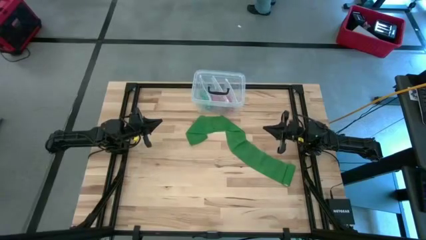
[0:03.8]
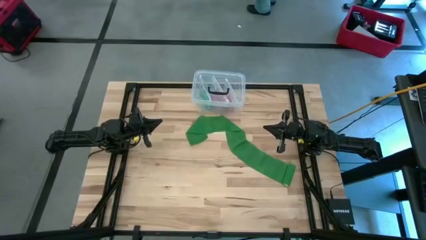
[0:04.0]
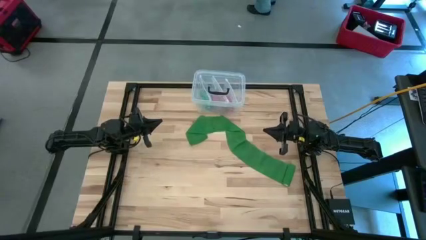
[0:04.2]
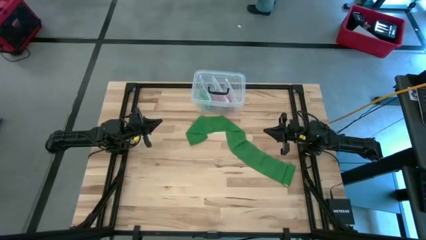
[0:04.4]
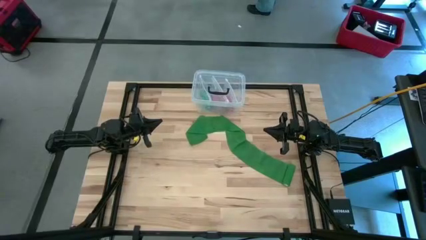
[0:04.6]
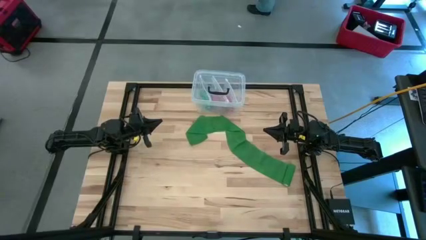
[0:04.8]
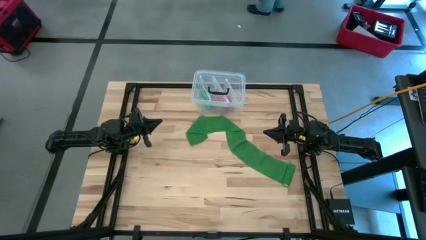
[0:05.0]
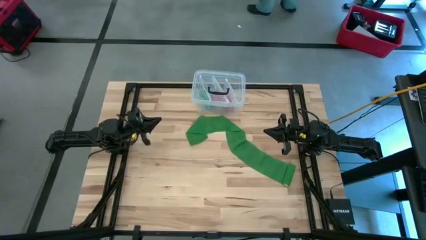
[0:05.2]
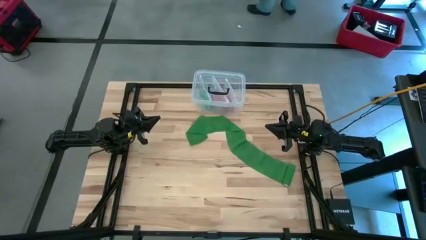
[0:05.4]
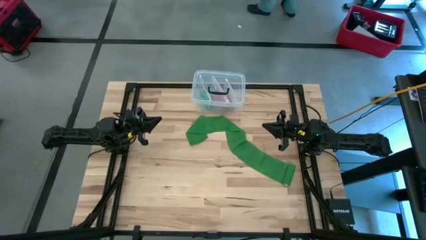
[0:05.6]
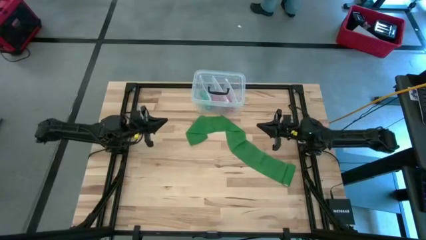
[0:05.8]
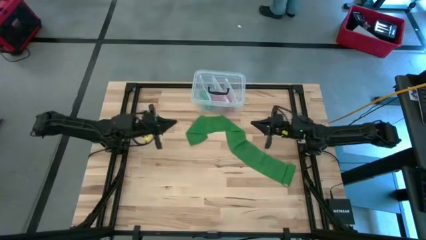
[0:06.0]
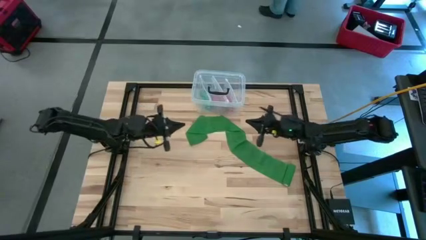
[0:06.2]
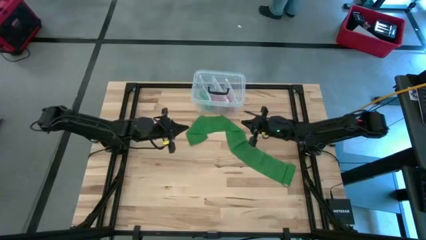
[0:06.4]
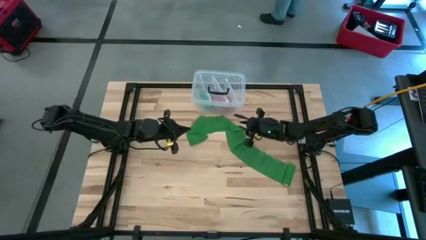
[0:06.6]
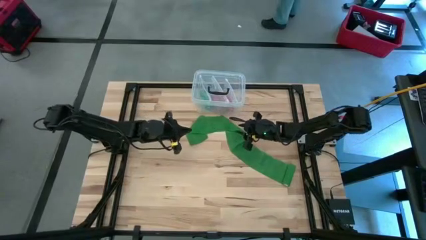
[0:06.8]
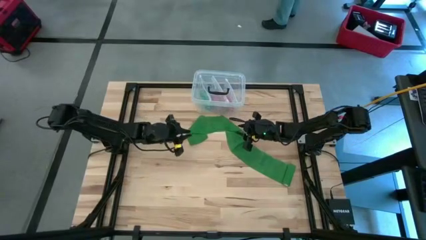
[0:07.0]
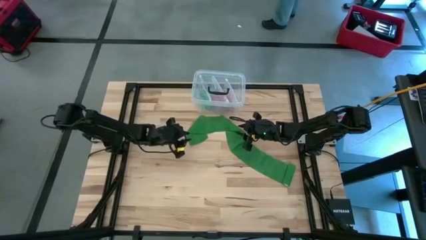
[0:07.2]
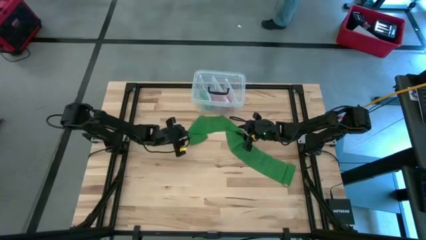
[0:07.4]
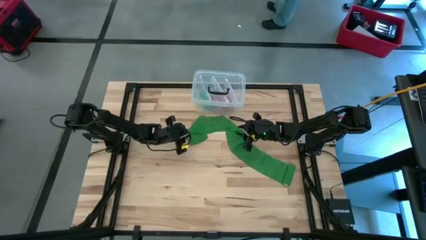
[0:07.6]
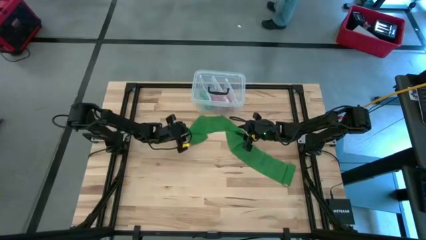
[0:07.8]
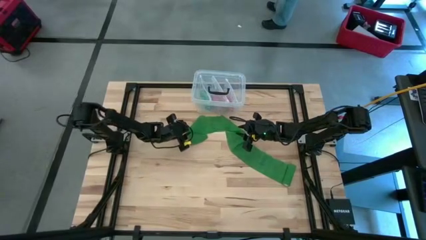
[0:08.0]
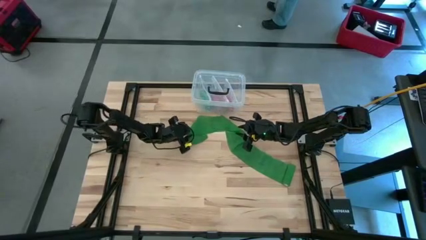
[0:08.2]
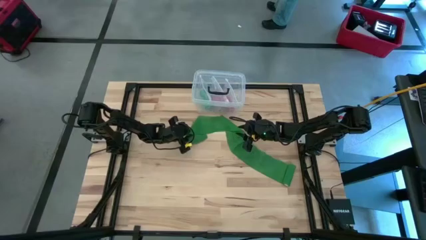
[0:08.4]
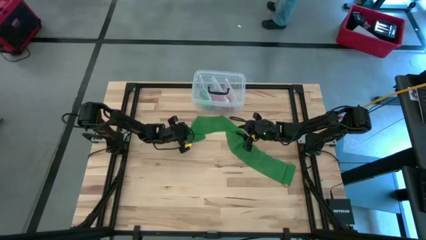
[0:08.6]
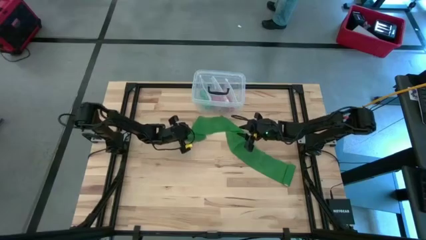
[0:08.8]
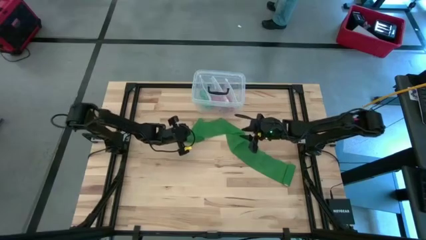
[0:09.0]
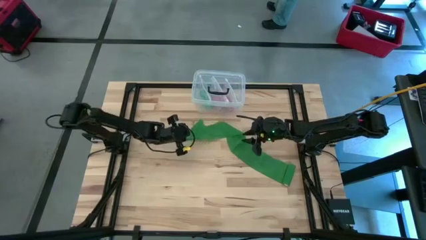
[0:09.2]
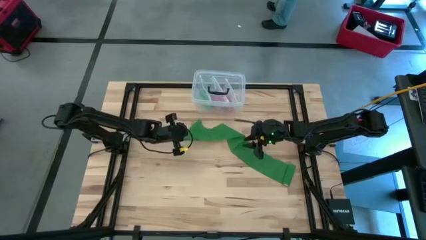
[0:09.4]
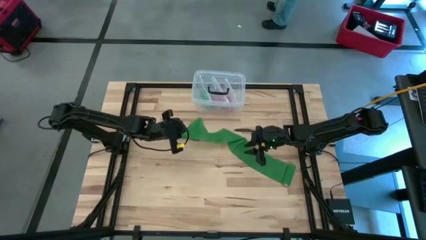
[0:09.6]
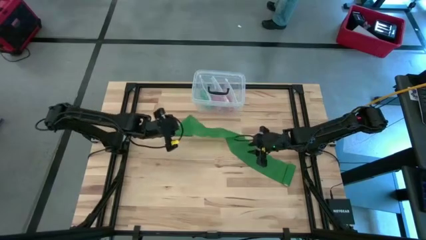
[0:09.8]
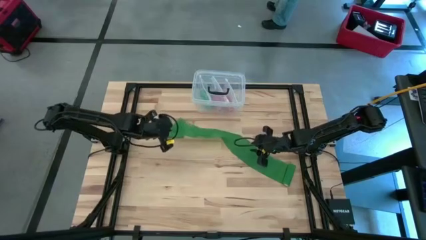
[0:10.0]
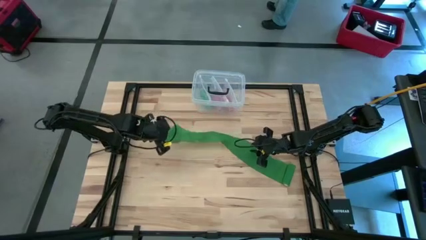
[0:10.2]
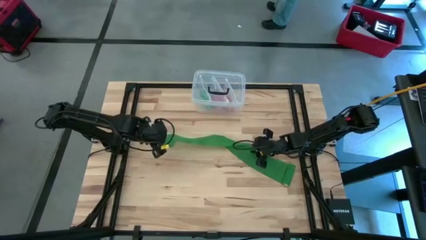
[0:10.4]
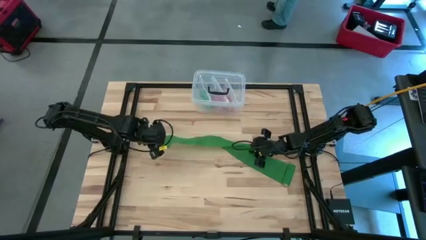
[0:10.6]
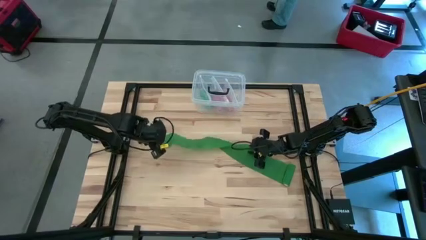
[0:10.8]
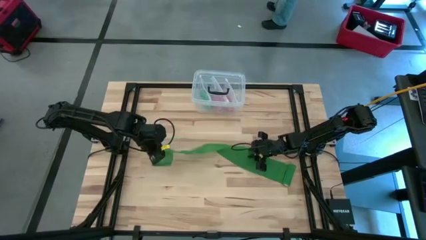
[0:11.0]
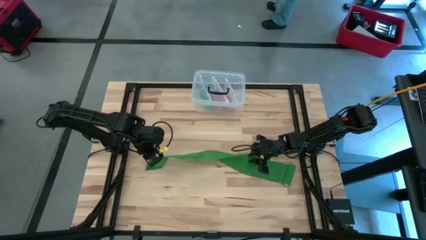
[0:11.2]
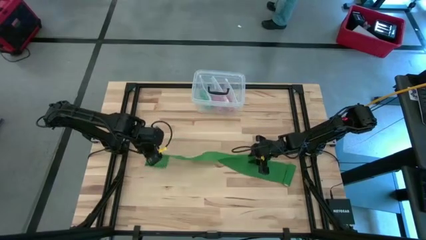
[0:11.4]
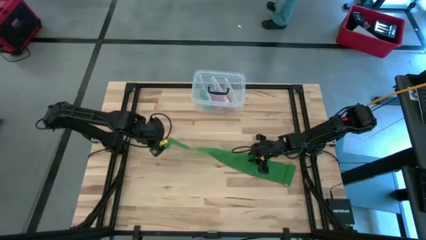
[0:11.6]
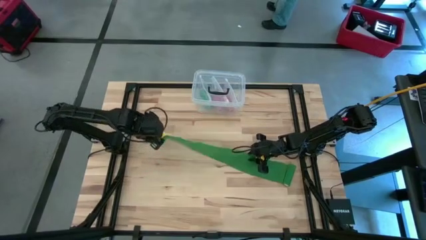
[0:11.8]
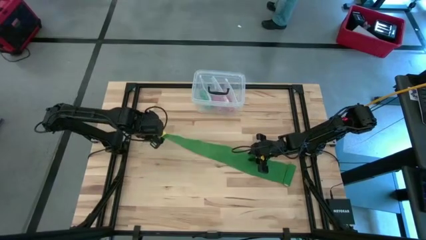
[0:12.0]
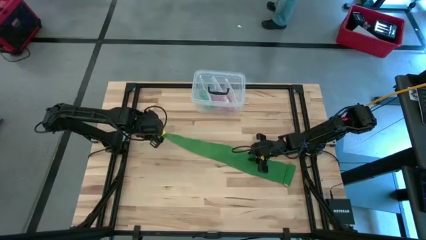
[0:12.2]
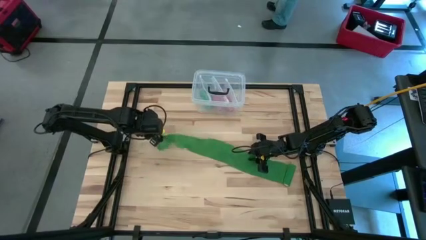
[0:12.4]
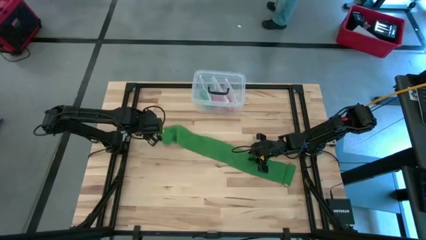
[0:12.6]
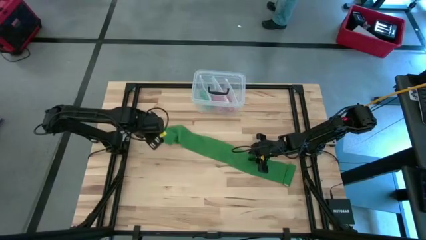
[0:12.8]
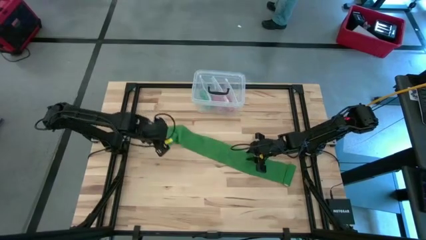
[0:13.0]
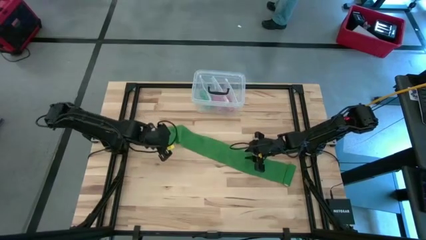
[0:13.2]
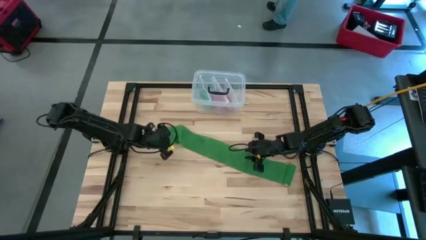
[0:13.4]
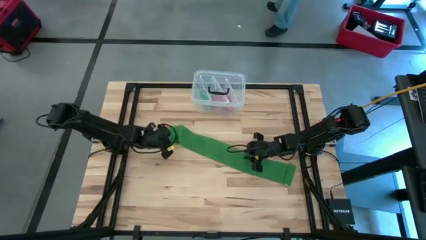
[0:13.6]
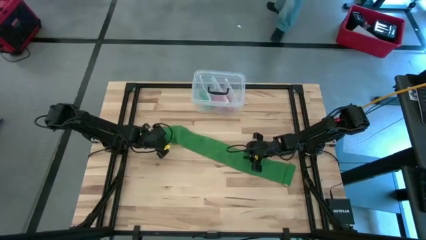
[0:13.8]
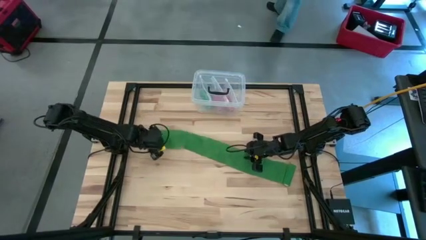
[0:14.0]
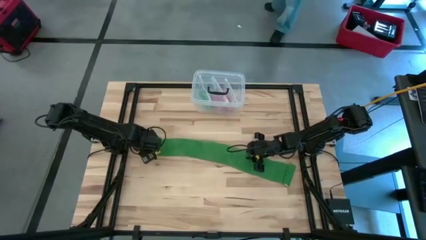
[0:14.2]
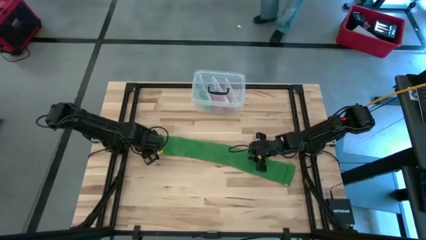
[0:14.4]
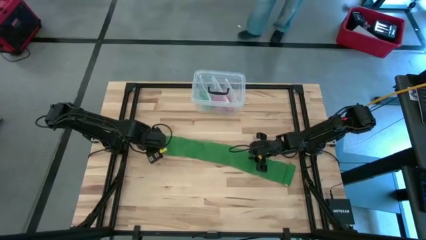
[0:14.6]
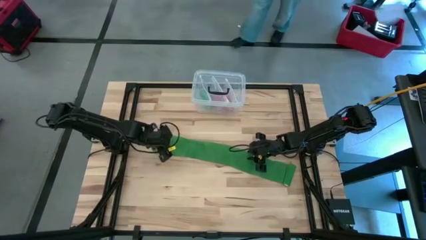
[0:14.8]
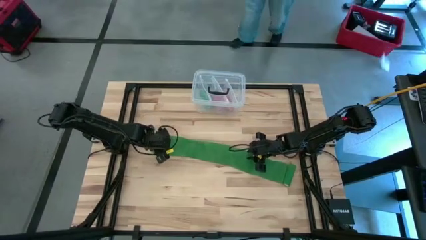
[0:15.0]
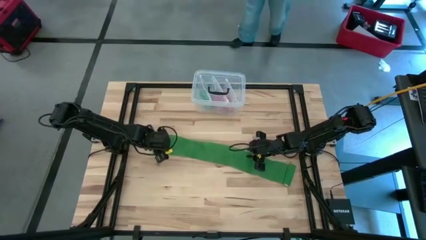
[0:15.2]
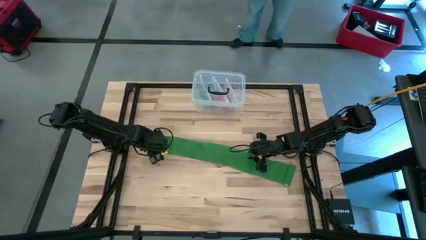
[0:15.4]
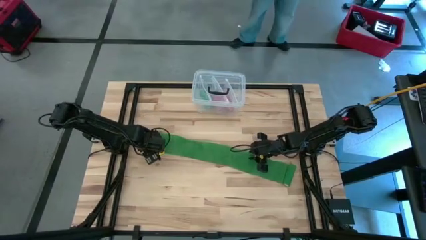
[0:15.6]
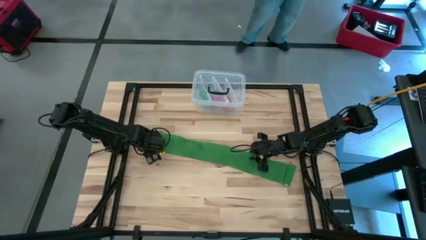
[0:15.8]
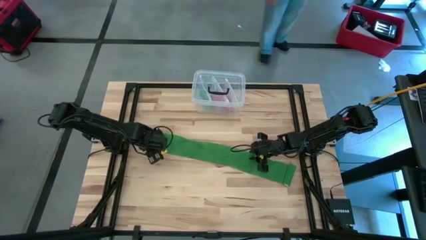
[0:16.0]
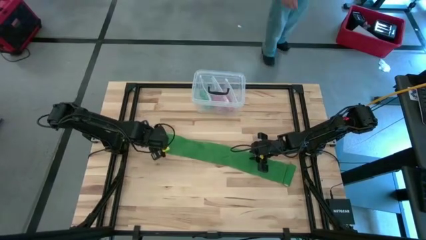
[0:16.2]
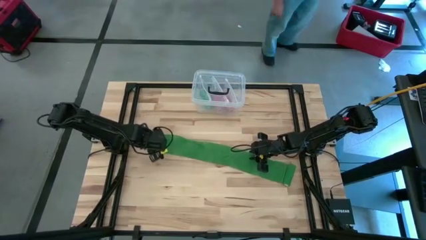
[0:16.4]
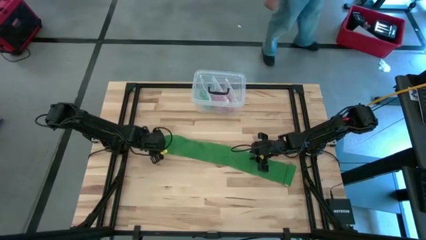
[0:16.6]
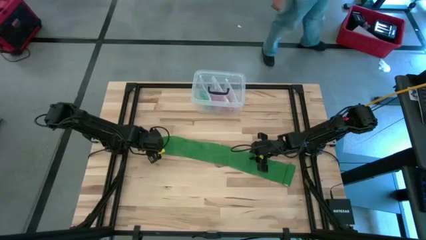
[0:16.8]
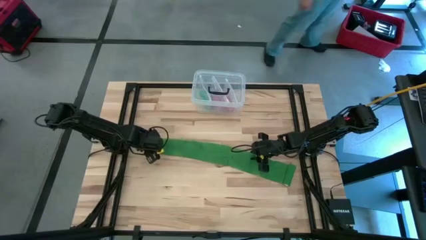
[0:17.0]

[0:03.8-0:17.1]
Task: Roll bandage
Roll the green bandage

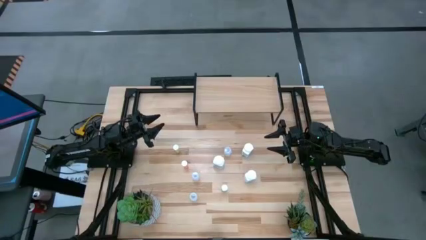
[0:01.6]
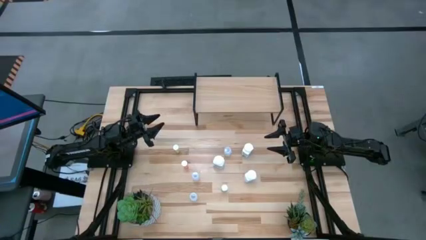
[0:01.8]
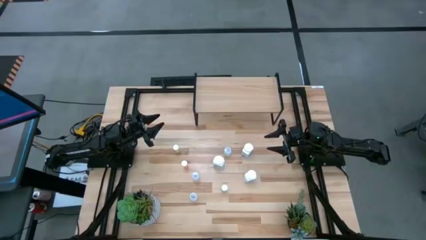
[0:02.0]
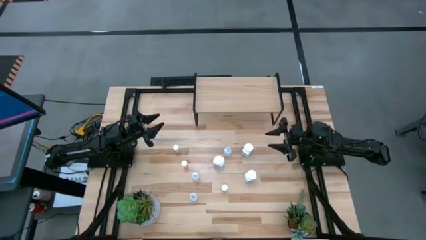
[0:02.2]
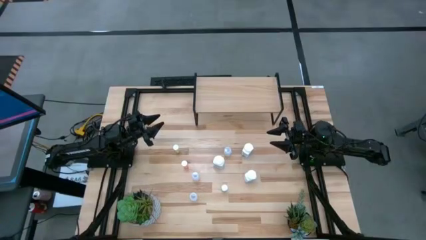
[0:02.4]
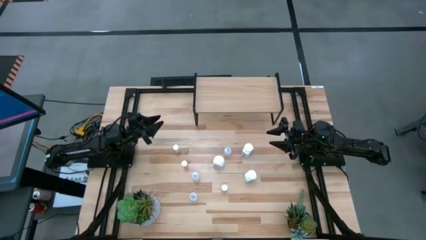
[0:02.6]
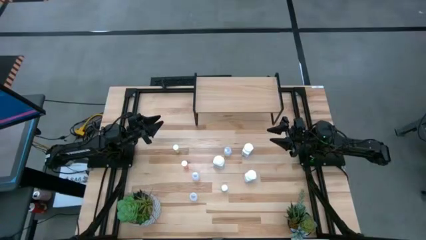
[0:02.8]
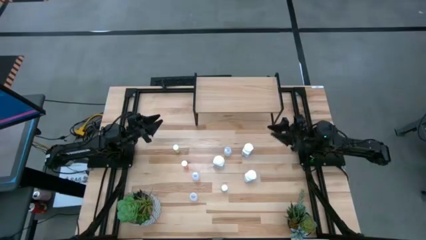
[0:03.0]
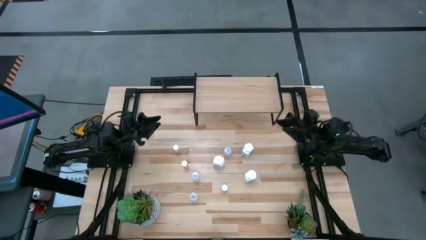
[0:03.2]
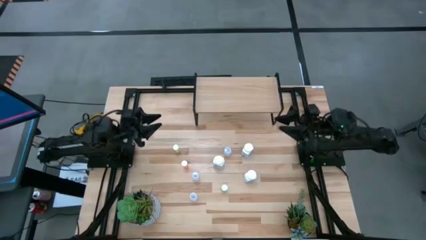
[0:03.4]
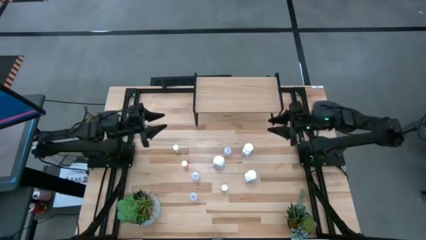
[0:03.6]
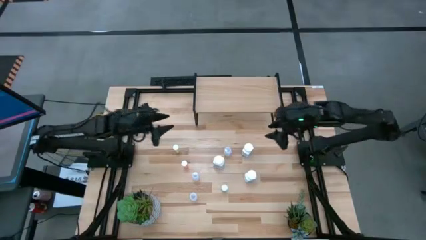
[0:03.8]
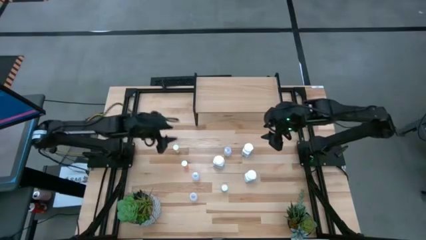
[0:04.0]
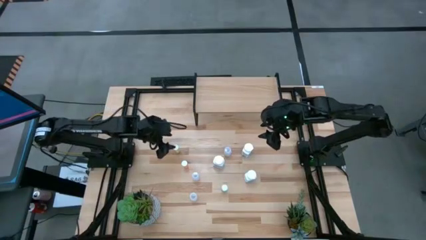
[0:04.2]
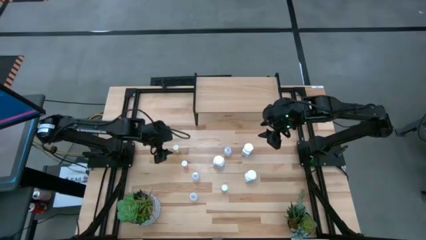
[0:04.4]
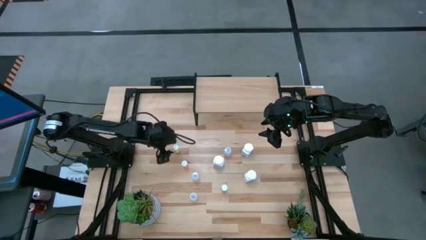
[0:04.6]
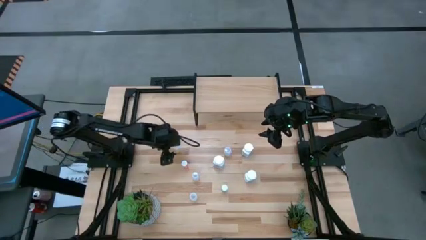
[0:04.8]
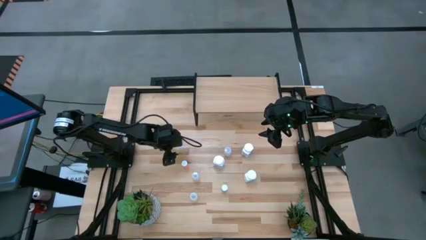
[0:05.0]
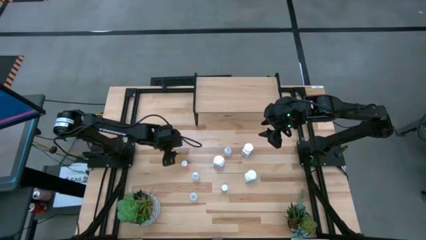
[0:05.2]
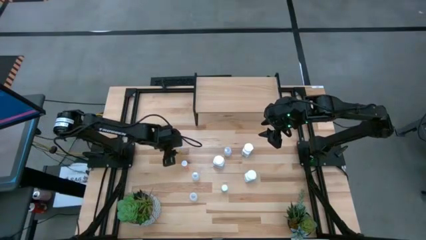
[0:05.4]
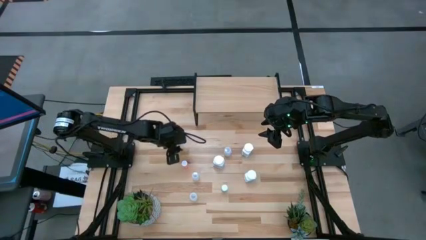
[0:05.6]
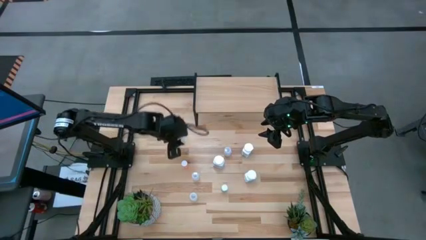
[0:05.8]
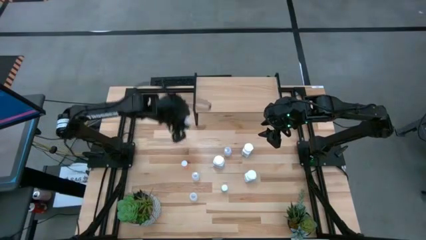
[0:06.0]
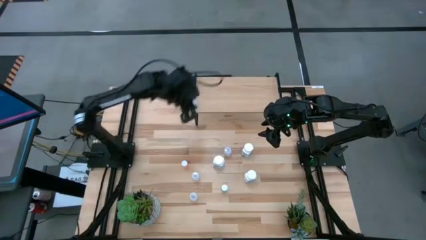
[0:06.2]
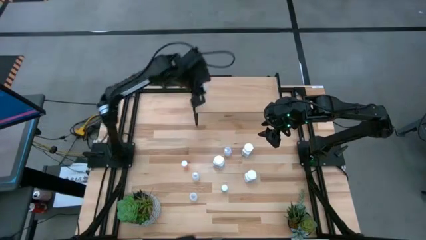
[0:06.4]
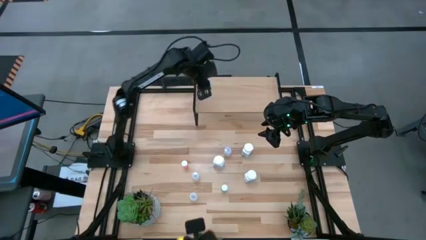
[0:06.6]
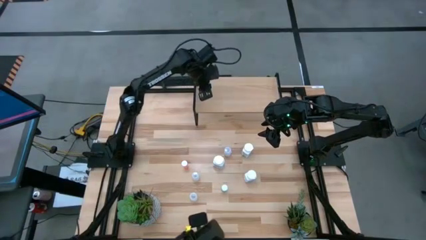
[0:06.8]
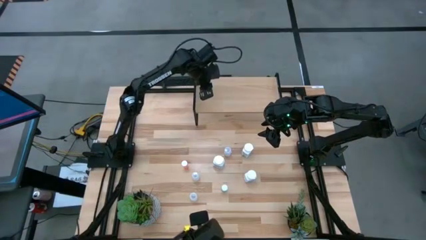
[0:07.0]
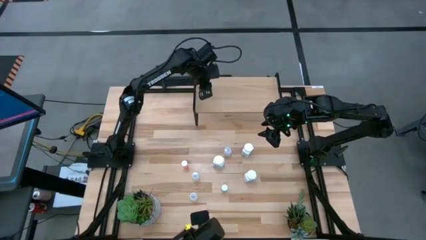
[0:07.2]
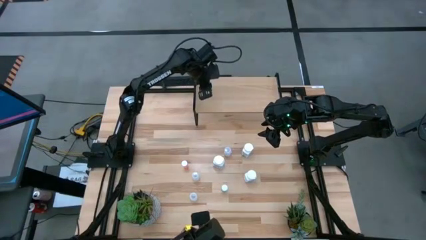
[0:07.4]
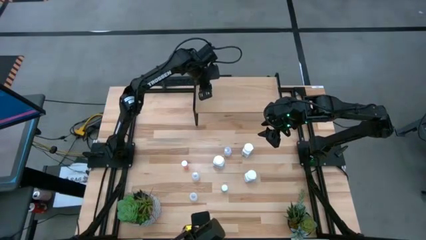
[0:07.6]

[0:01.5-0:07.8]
Task: Pick and place medicine bottles onto shelf by color
Put the yellow pill bottle on the shelf
